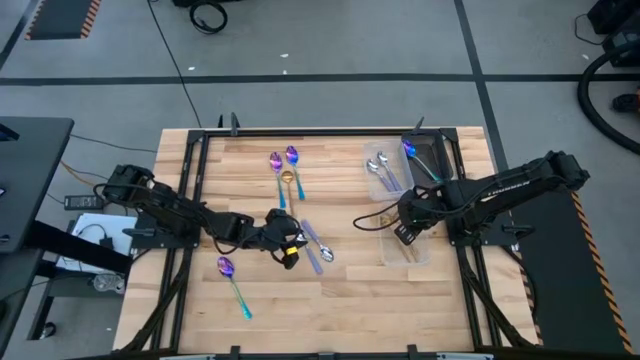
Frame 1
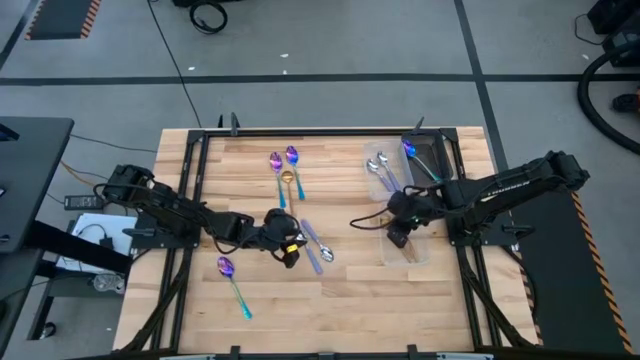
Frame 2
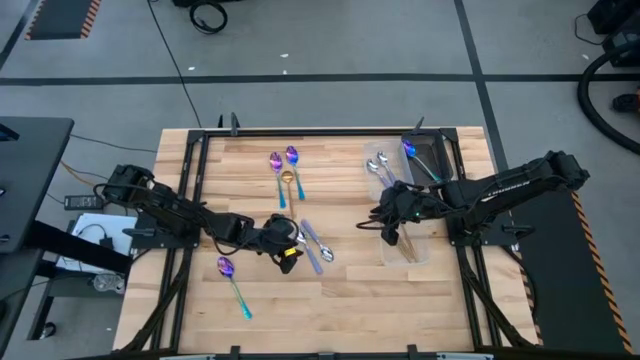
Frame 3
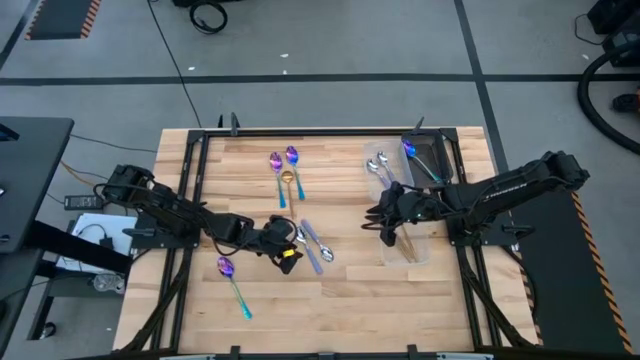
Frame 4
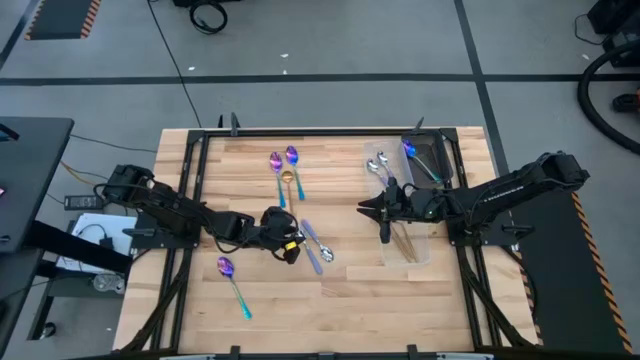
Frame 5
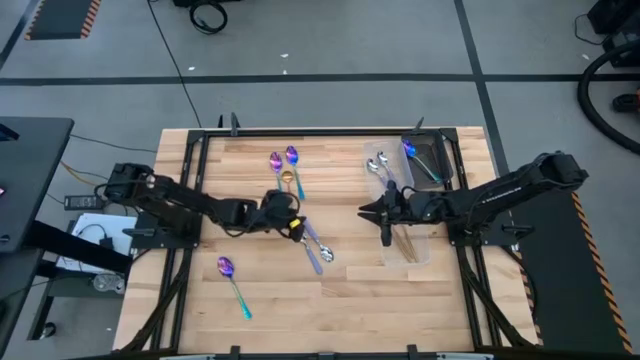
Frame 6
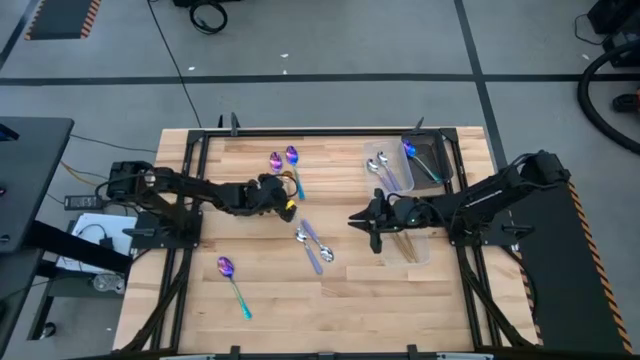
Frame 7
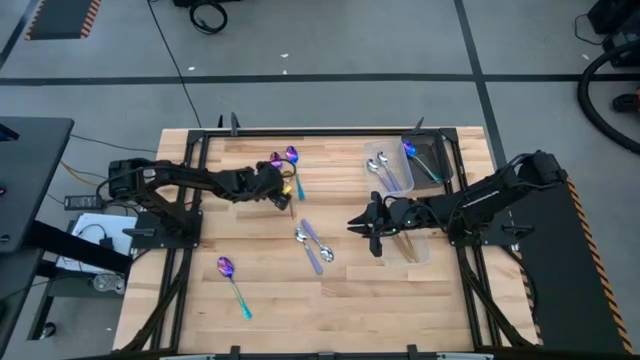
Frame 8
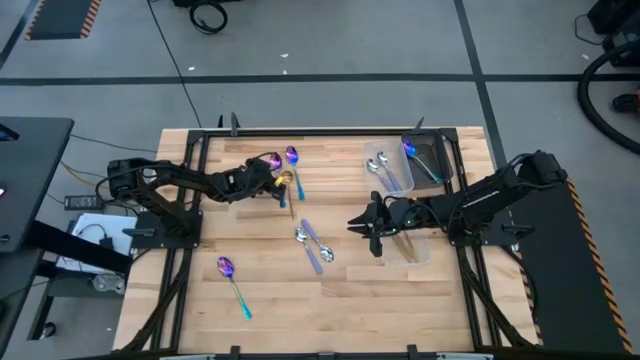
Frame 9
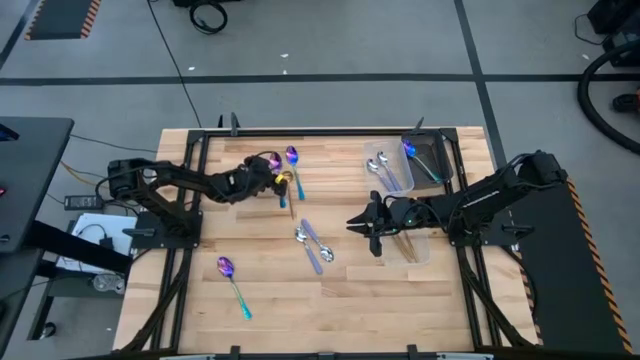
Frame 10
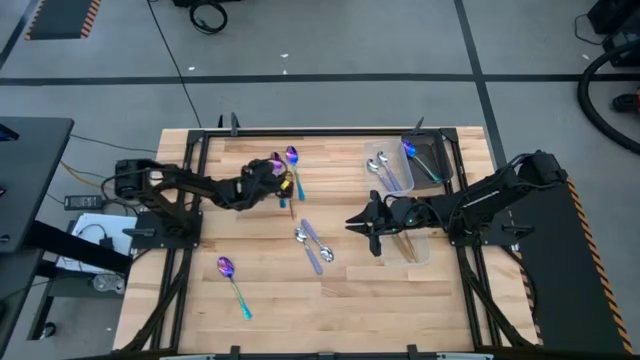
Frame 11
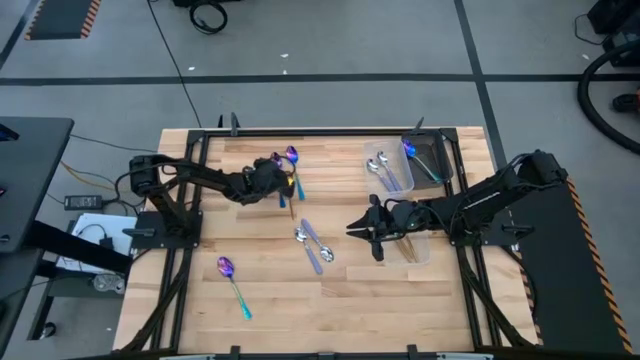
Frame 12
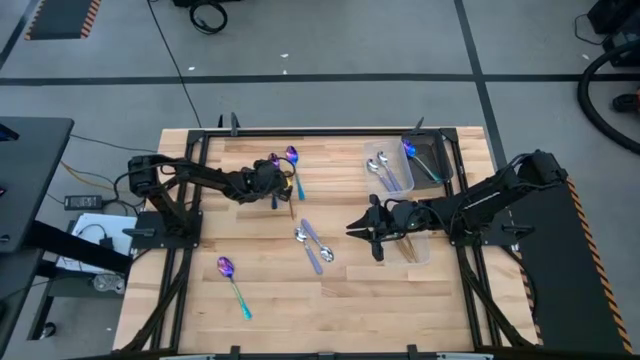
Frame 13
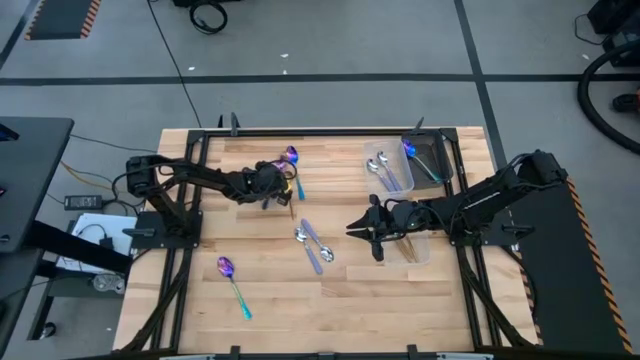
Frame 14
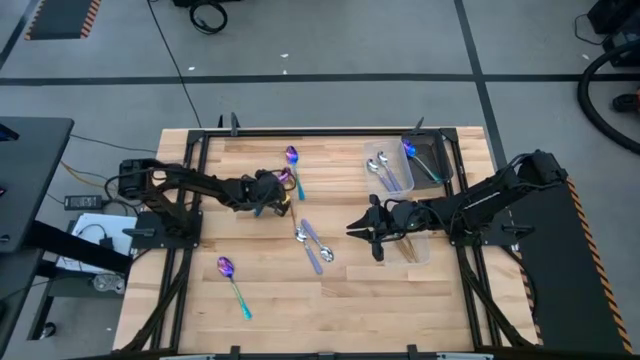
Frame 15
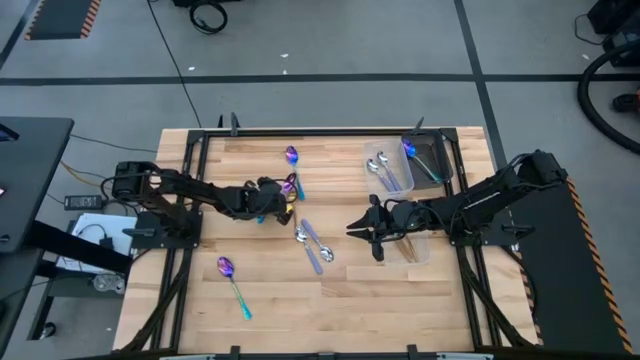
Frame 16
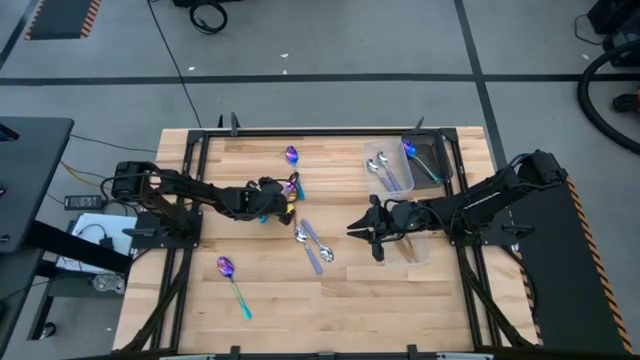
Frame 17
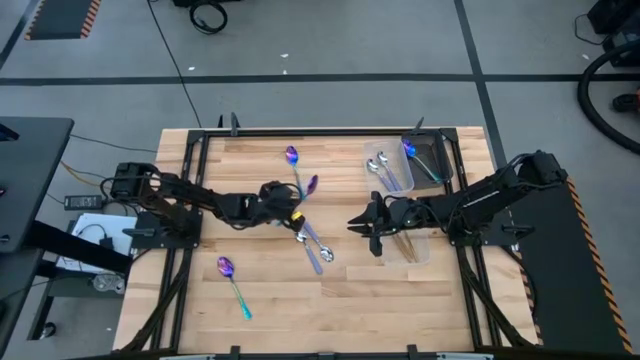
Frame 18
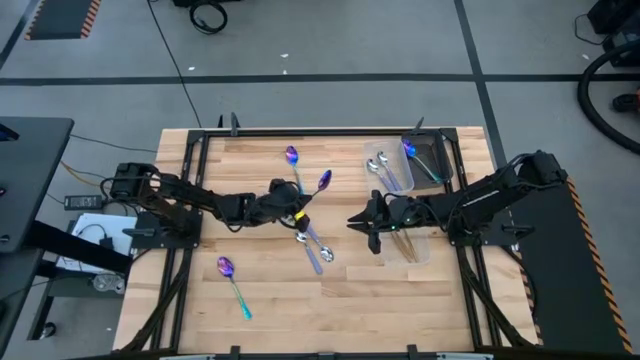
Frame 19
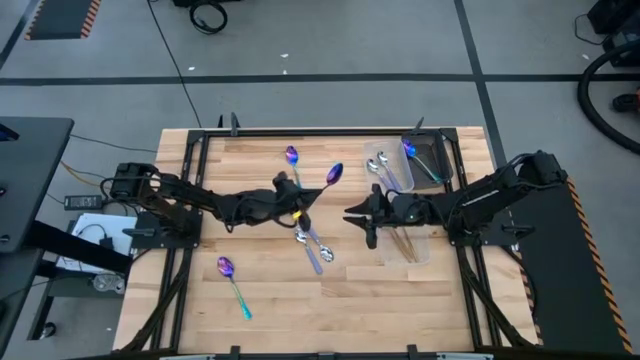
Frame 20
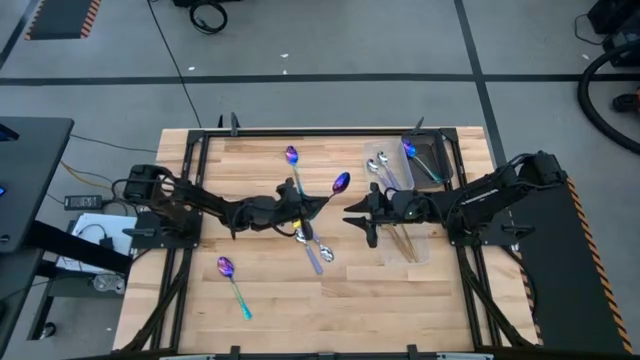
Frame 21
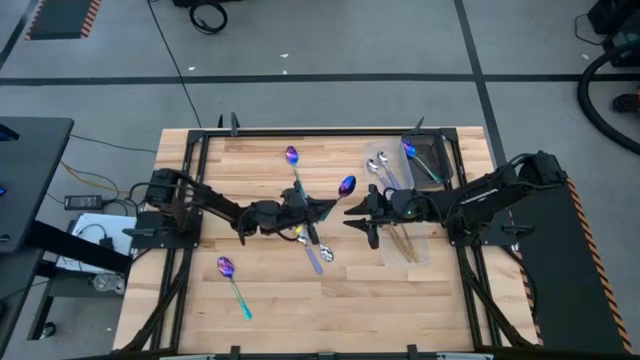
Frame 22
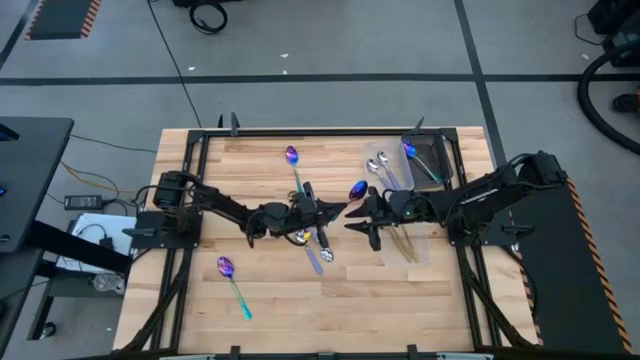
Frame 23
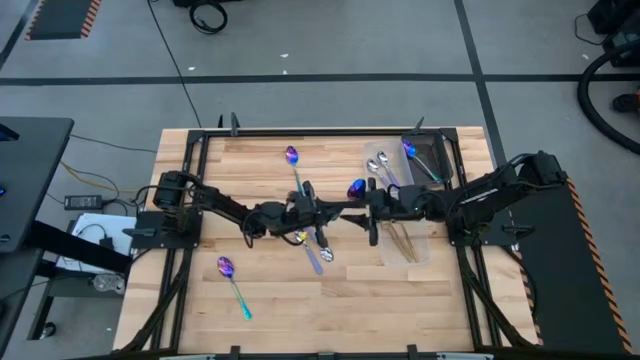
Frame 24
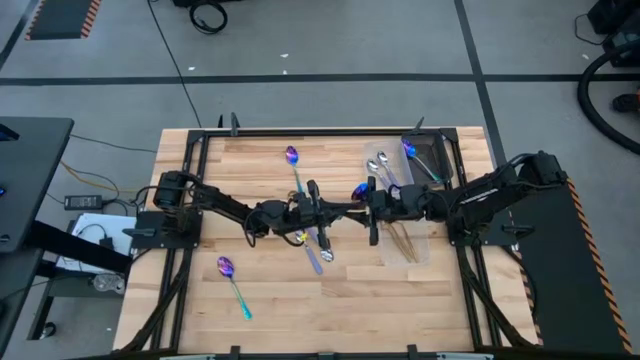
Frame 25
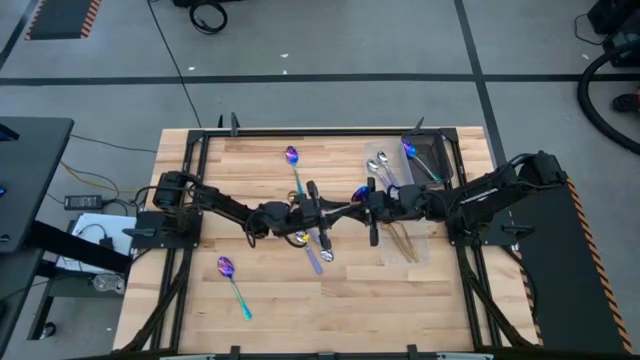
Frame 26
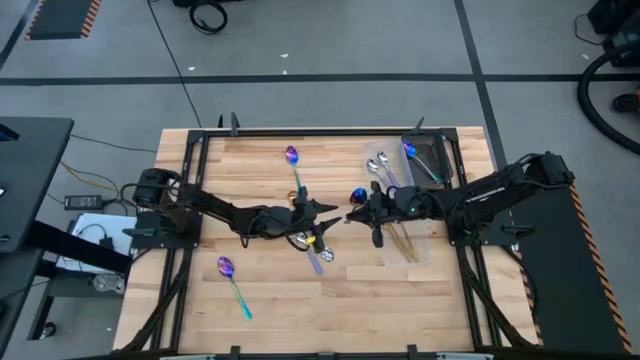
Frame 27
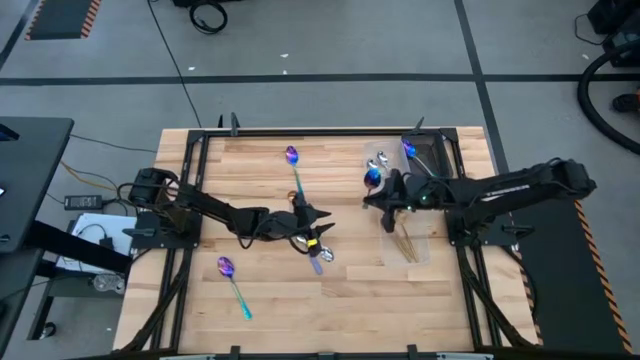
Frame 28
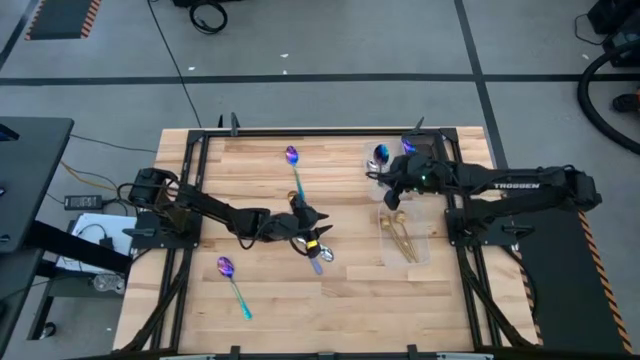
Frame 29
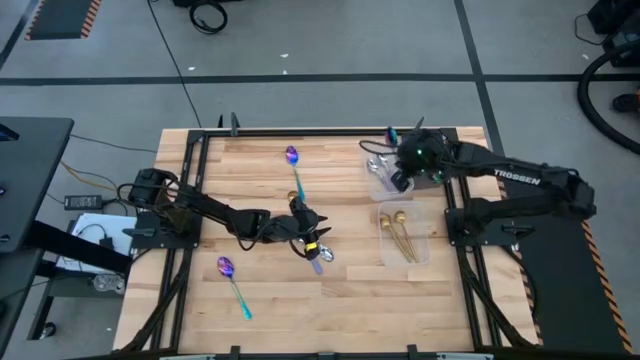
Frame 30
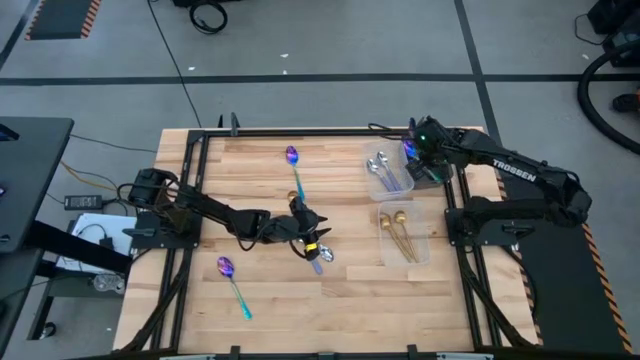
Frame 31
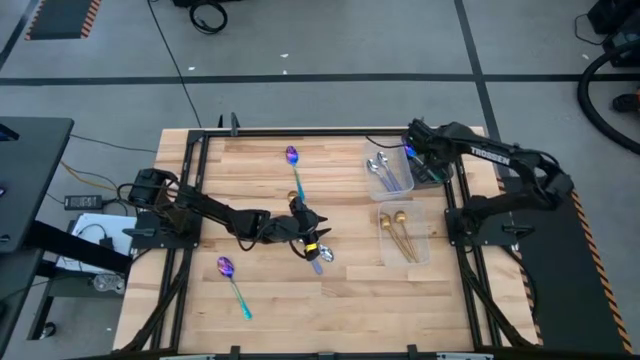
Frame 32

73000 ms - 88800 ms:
Task: Sort silverware by color (type)
Put the blue spoon into the black bin

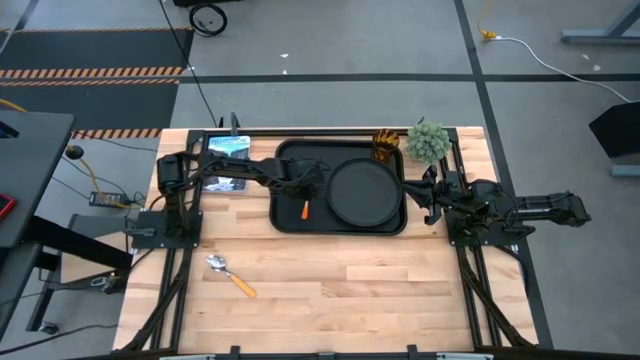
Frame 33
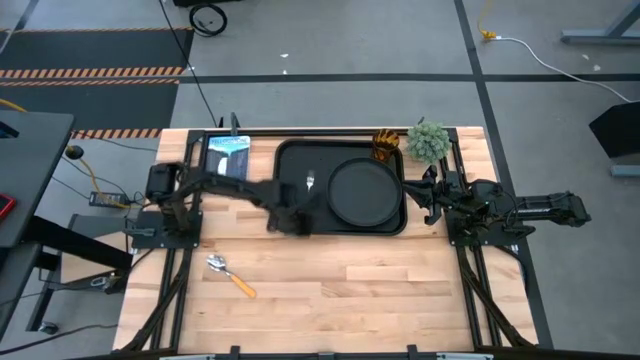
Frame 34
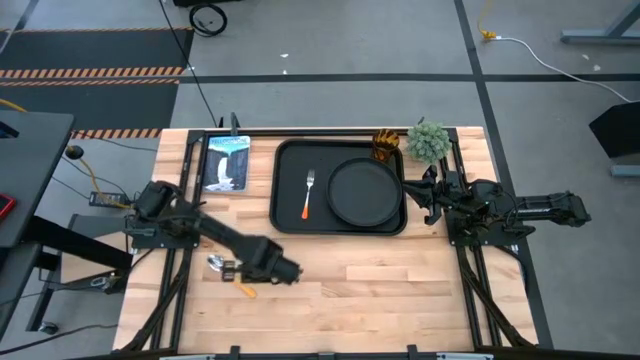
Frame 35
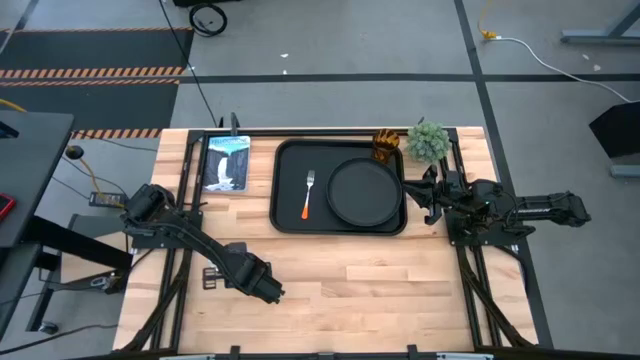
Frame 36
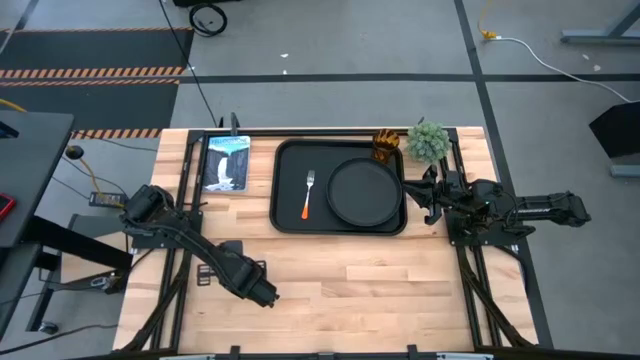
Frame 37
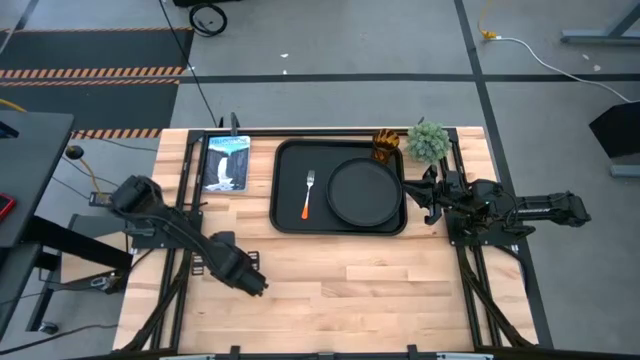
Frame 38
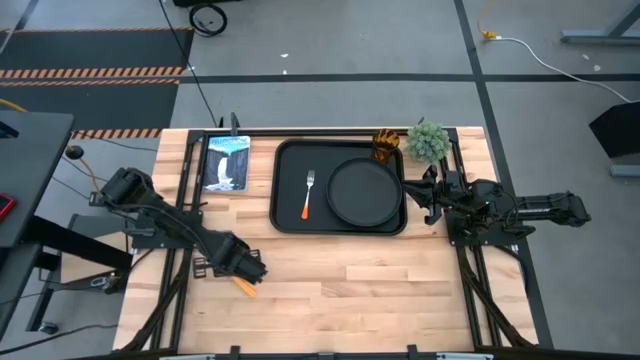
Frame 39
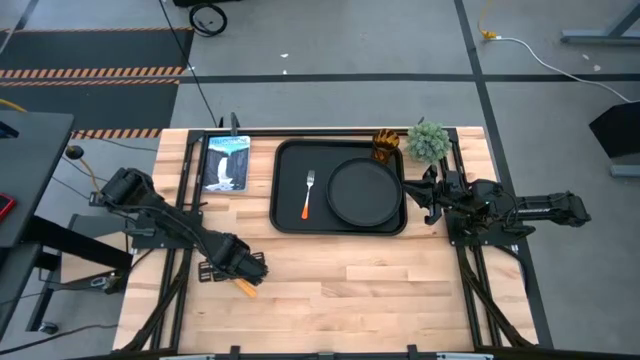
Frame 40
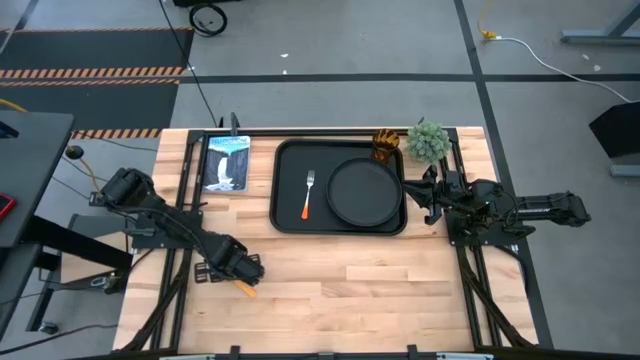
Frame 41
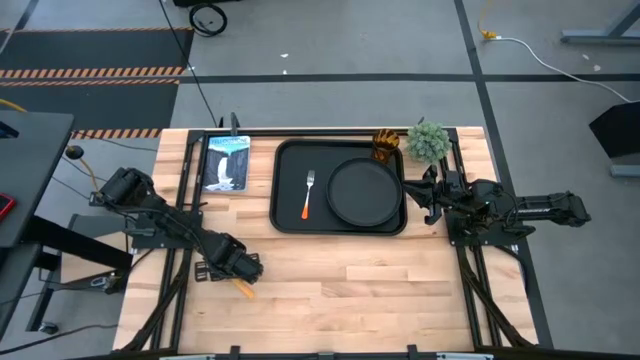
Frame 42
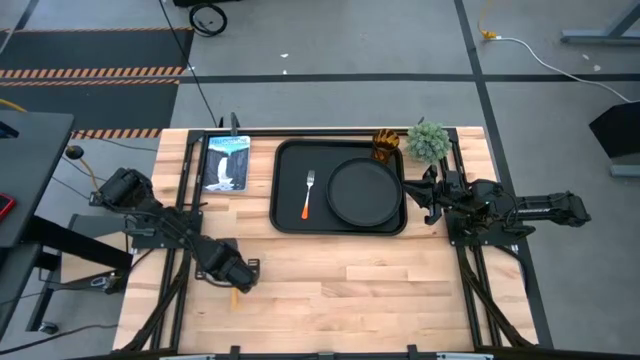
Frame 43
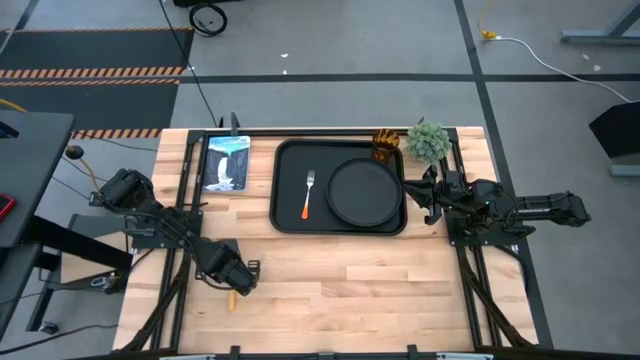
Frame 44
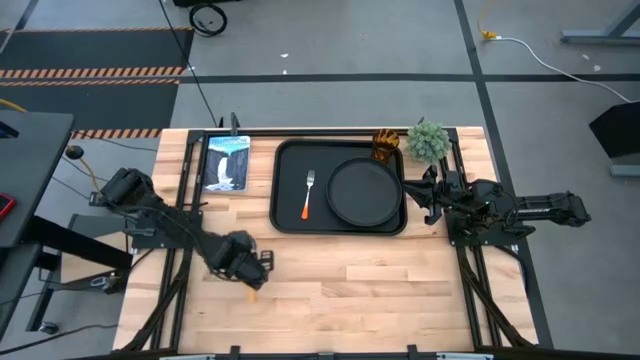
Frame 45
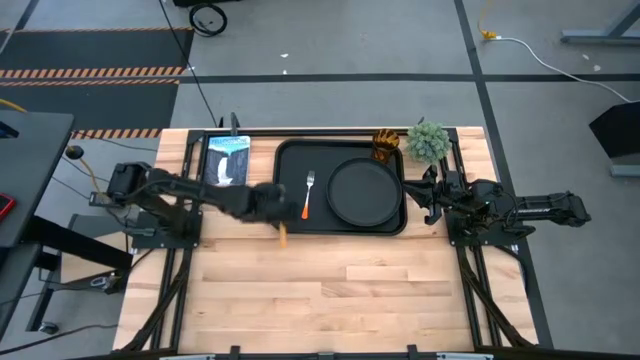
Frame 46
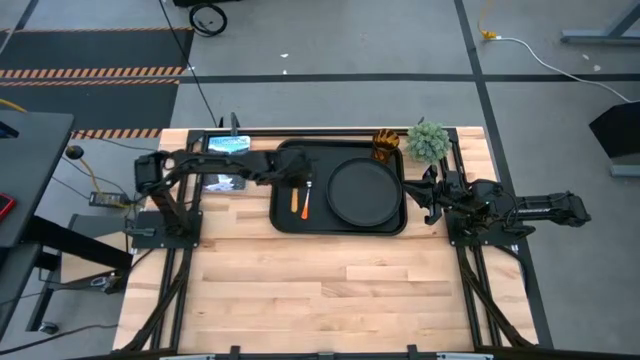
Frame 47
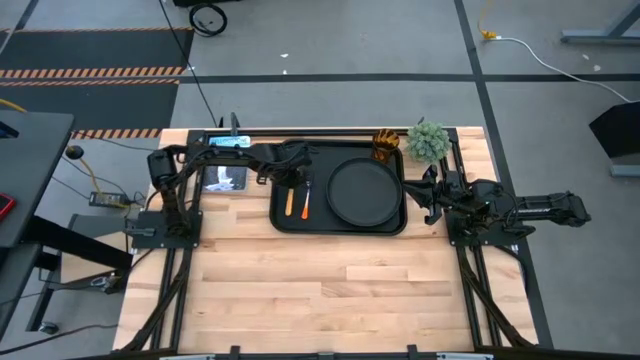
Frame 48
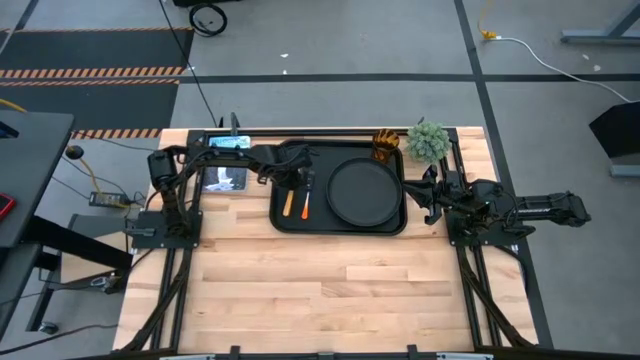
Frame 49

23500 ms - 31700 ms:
Task: Pick and place plate/cup/fork/spoon on tray
Put the yellow spoon onto the black tray
